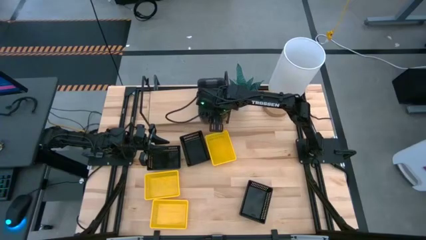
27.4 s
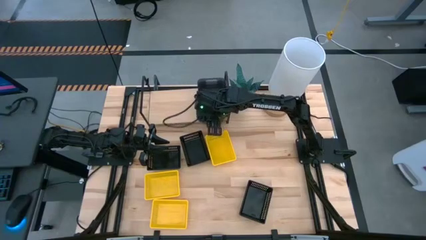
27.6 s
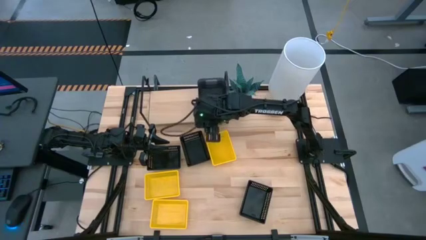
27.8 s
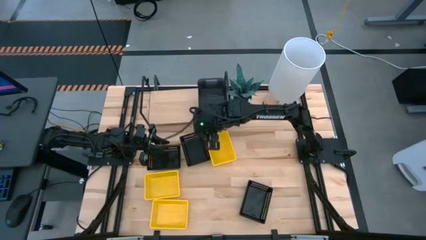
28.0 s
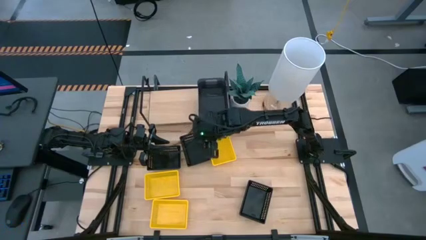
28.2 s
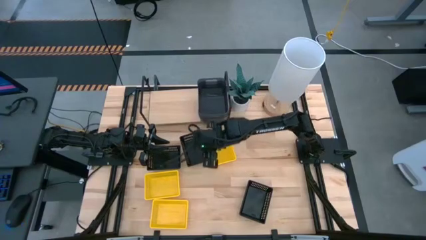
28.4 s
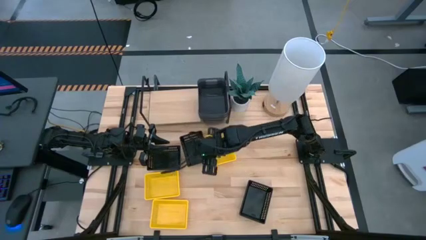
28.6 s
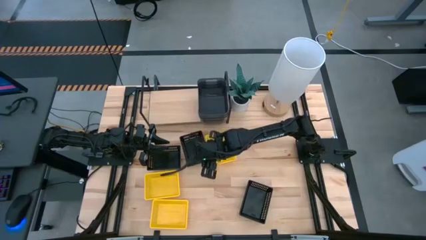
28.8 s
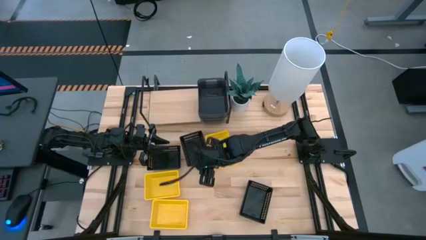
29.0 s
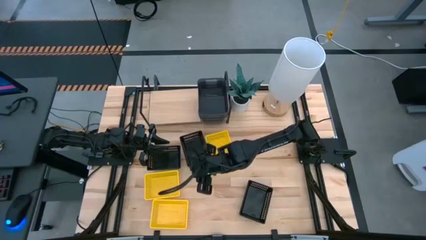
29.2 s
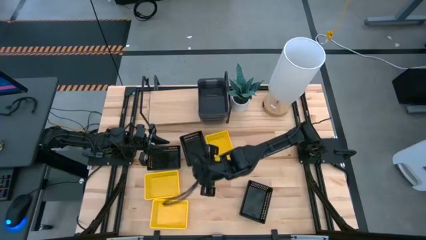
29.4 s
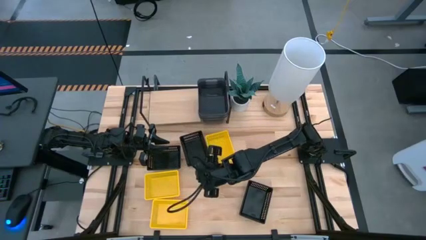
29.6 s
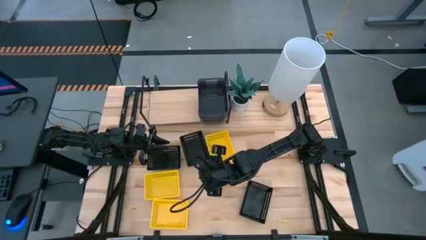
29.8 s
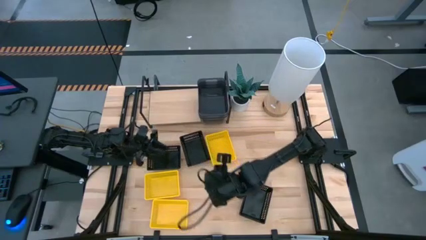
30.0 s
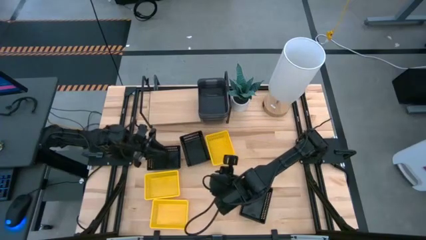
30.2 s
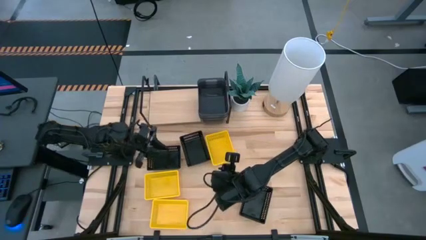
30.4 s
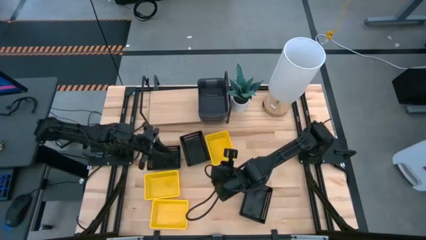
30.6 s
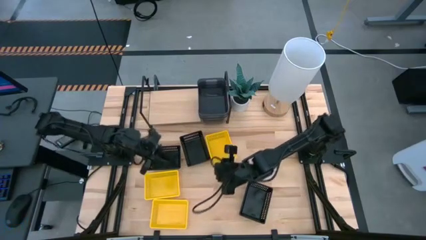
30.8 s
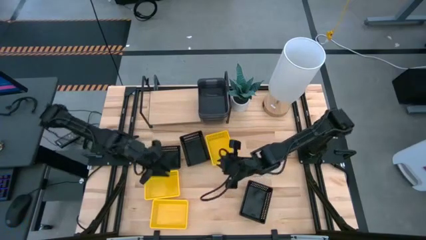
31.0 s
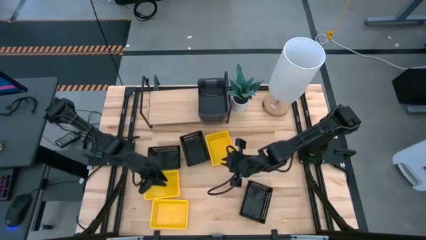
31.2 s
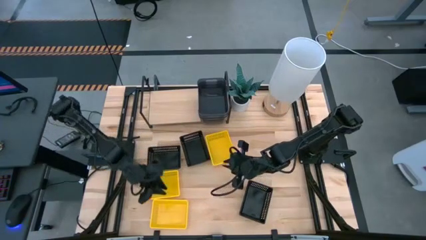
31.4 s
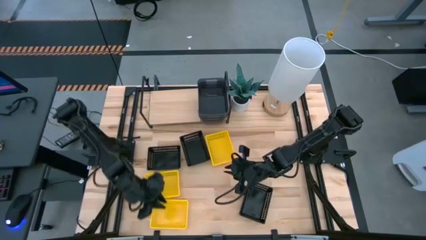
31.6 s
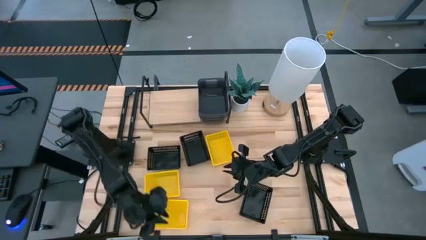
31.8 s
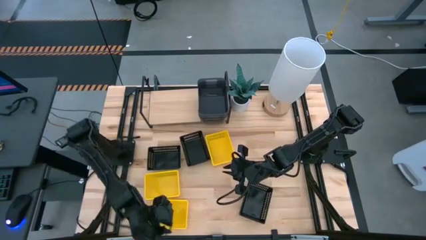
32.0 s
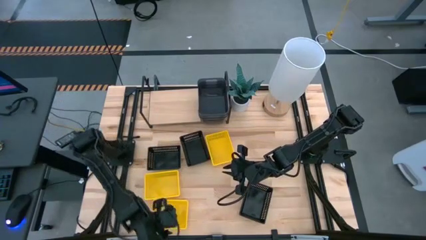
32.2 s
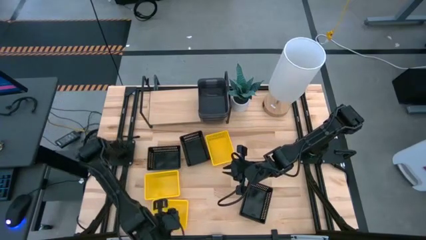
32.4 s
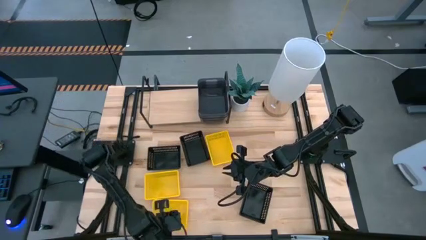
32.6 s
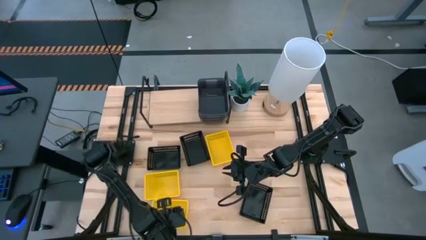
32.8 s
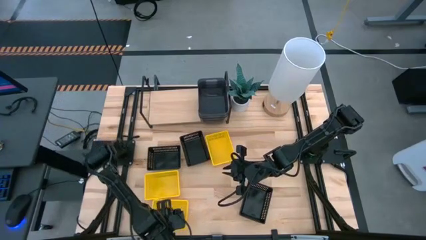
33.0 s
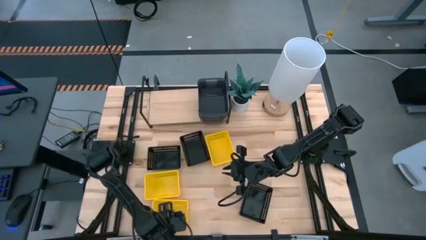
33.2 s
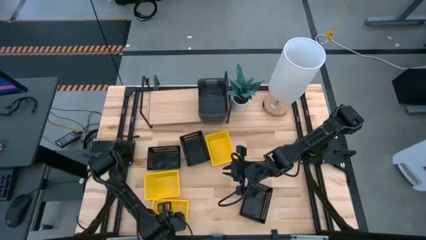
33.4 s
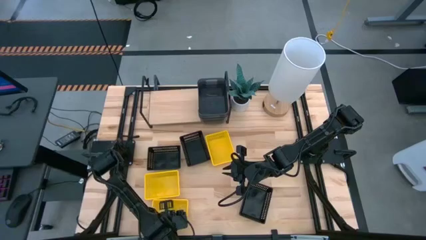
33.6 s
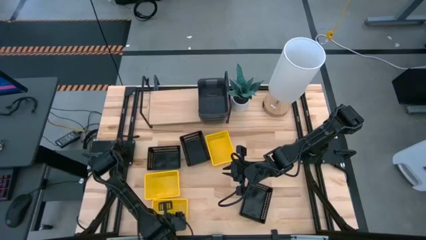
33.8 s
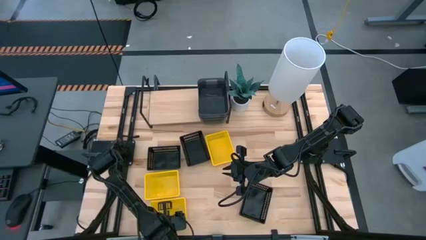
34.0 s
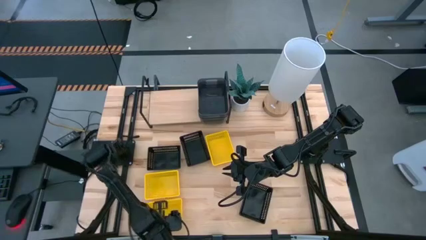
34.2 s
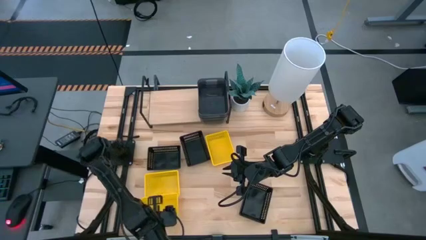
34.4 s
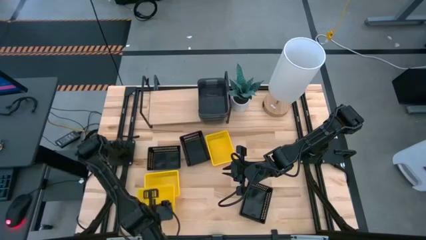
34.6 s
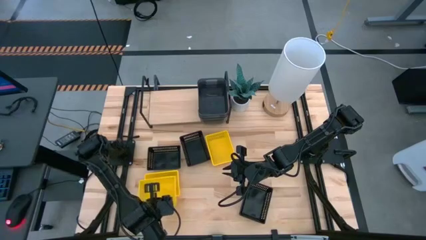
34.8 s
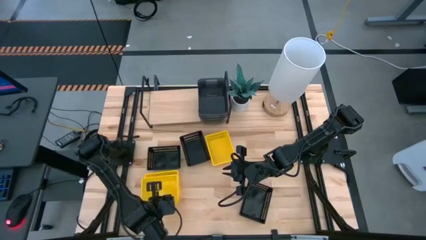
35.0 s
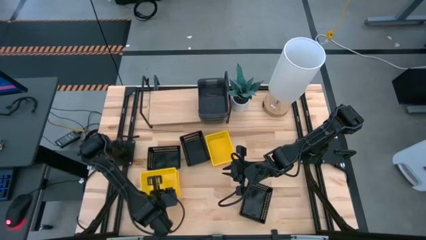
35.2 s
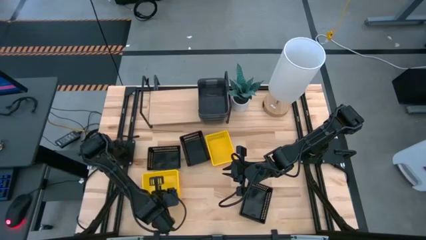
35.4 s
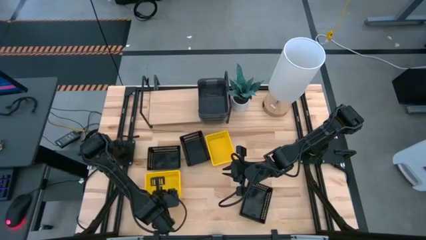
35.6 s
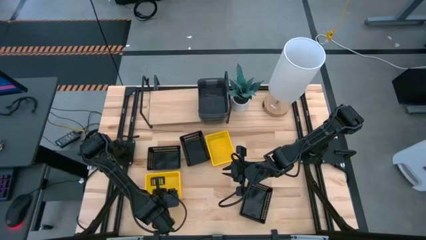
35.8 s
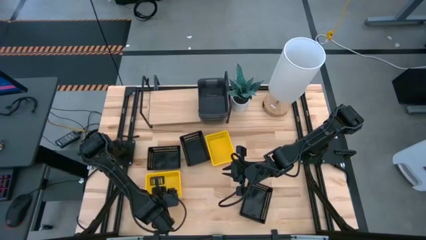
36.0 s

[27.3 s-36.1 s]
Task: Stack baskets on shelf by color
Stack the bottom left yellow bin on the middle left yellow bin

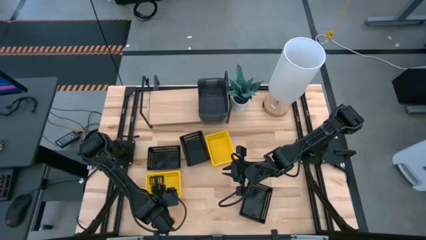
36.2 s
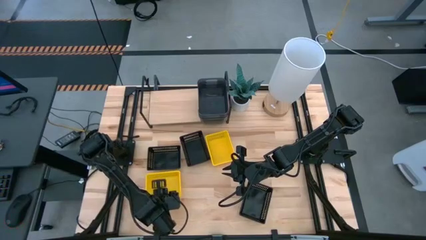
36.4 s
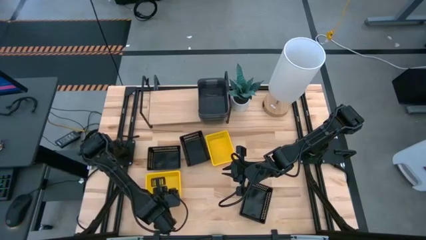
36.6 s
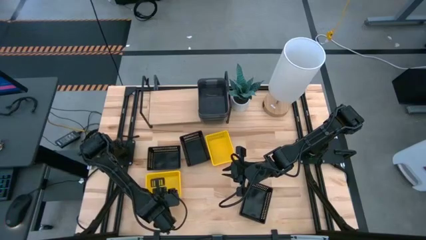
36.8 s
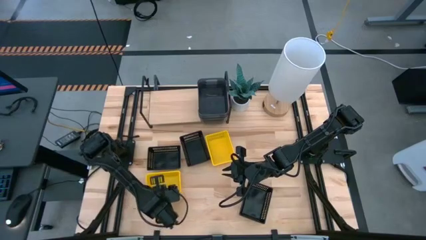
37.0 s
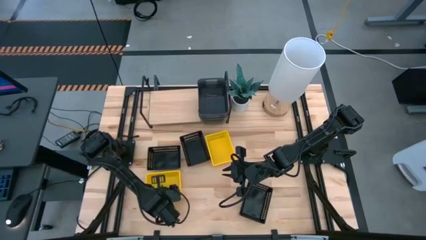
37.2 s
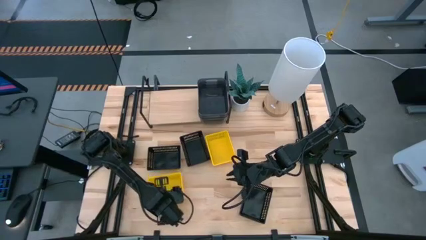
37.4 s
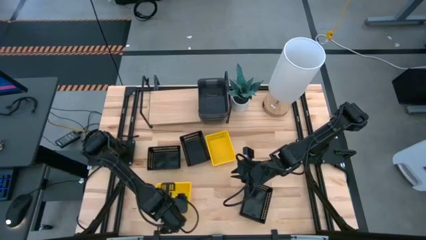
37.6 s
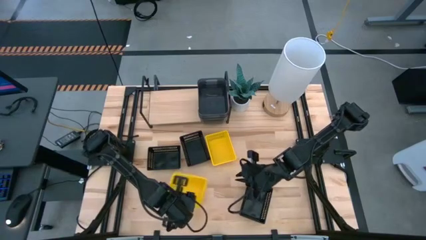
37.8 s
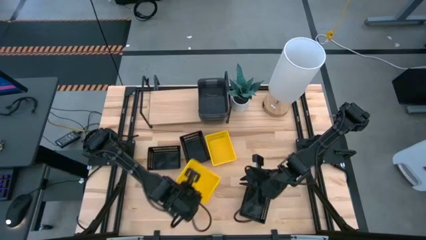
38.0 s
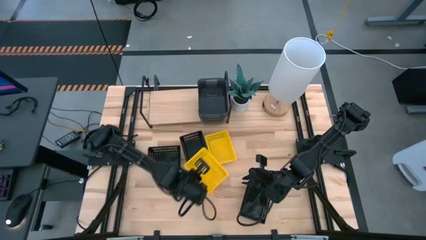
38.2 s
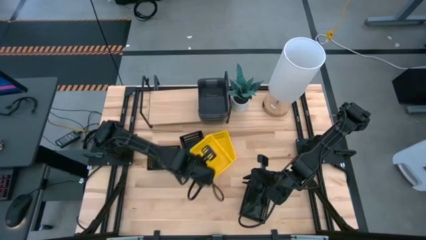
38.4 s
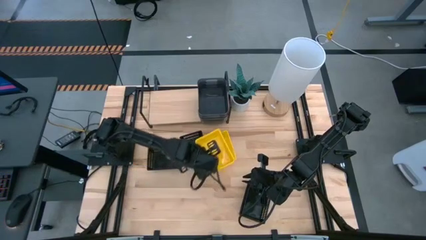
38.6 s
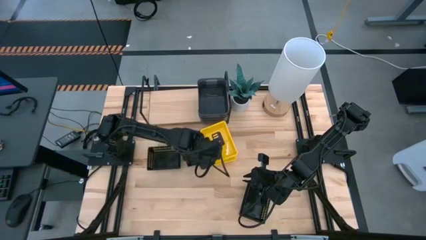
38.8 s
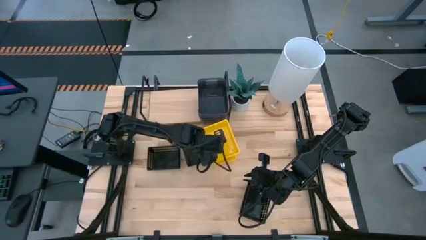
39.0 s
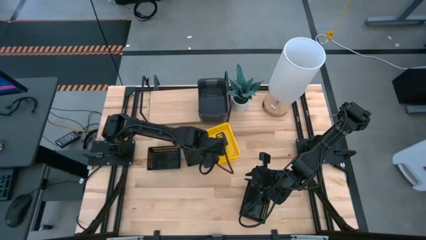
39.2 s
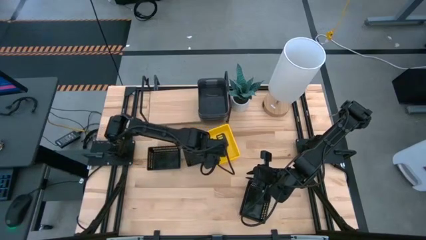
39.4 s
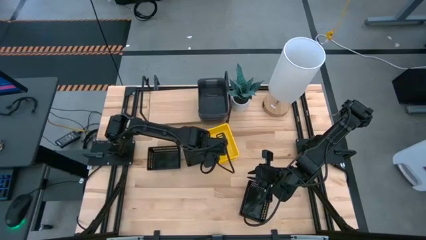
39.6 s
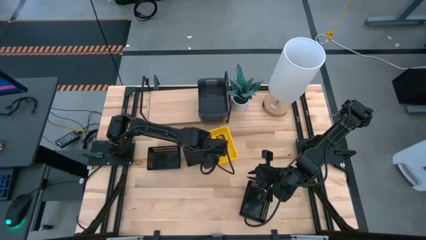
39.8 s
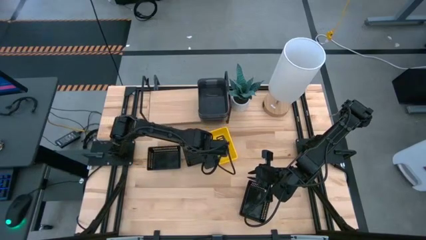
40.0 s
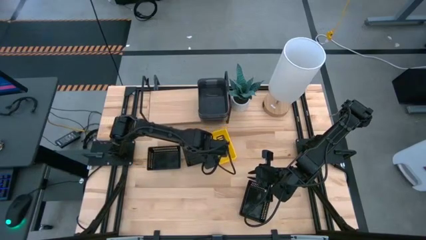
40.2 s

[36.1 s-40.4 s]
Stack the stacked yellow bins on the top yellow bin

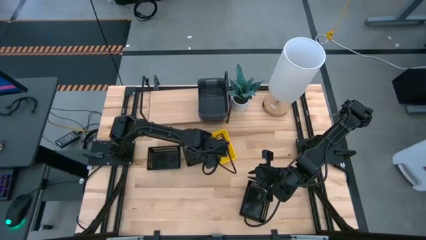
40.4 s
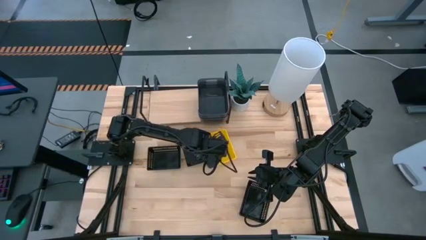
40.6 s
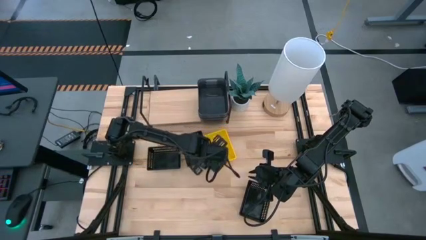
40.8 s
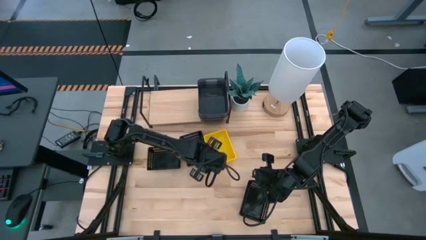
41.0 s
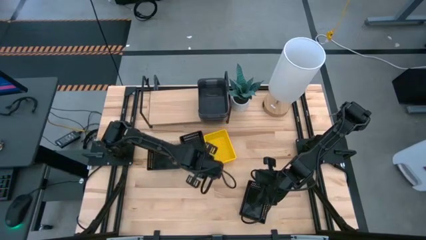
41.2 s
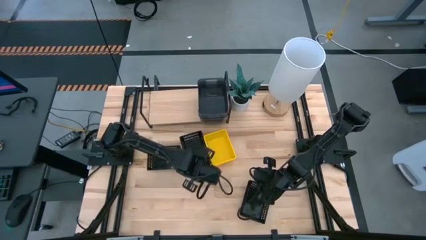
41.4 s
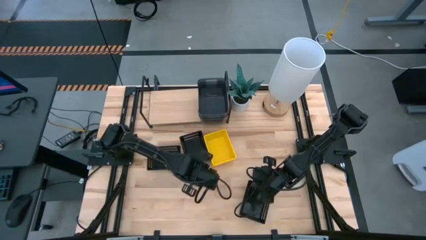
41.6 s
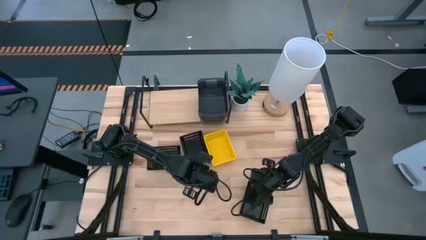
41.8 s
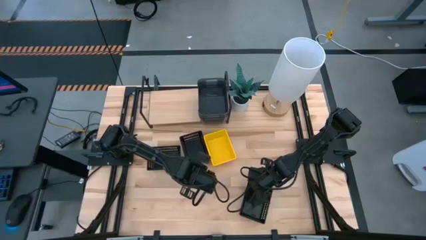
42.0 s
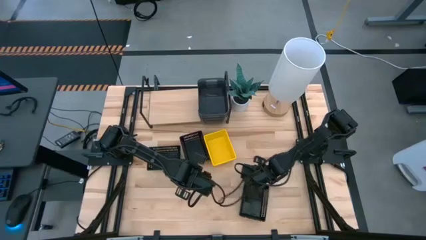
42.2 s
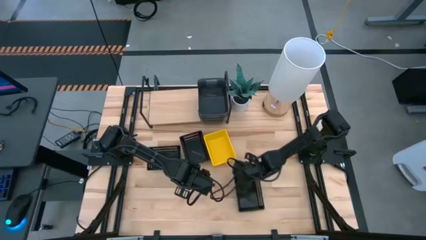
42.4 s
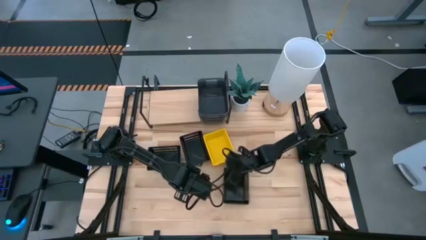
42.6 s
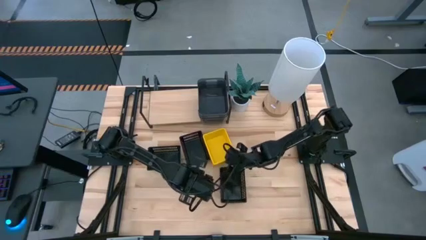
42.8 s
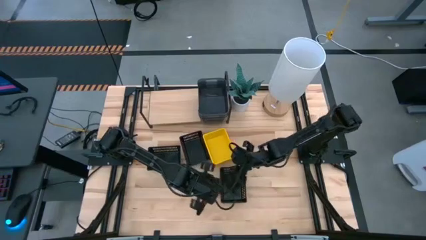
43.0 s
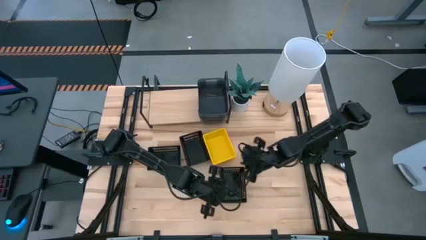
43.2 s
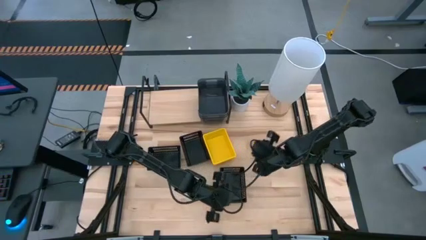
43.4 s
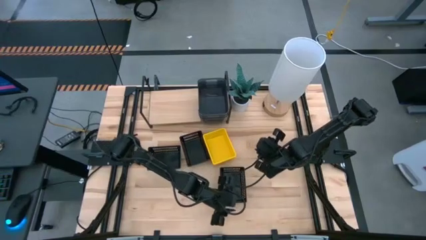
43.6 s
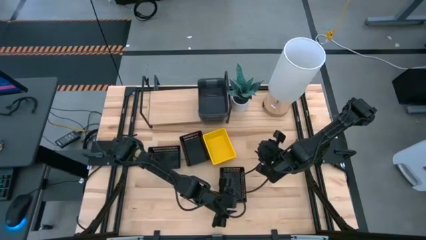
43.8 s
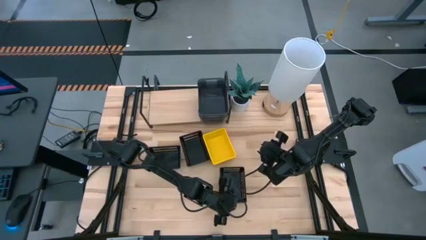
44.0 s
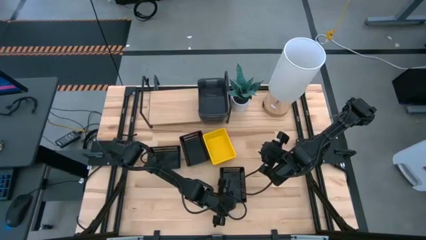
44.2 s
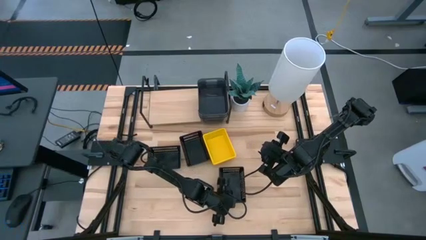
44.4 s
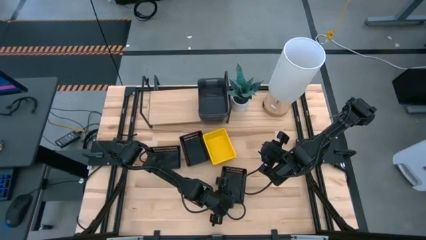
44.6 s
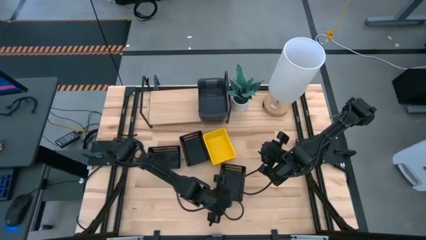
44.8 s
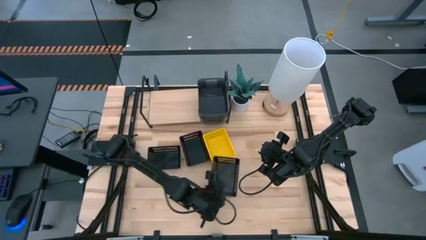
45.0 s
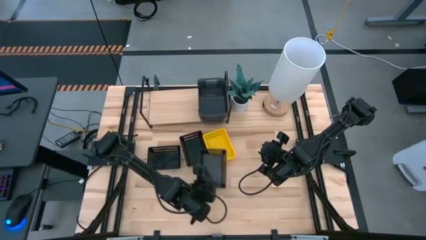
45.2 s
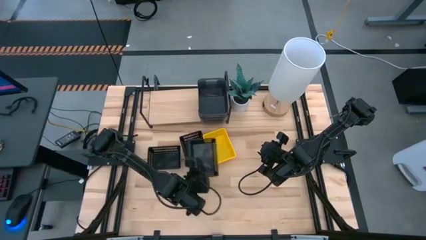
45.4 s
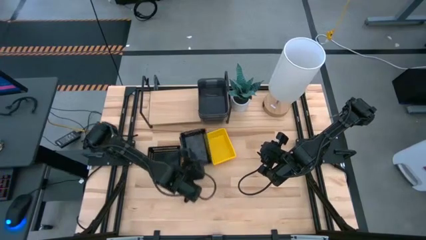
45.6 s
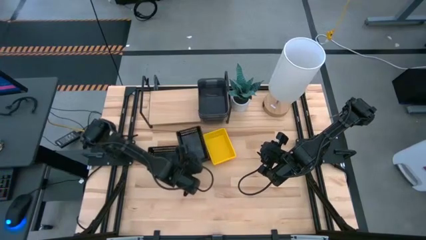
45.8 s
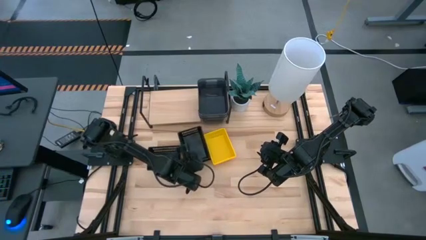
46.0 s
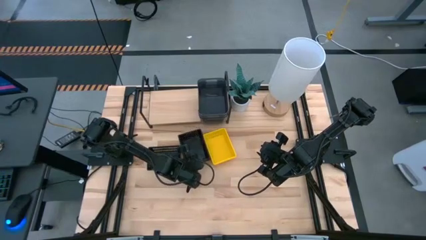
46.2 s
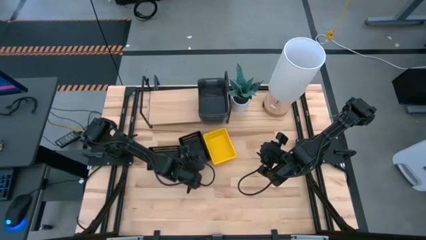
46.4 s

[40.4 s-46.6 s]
Stack the bottom left black bin into the middle black bin
